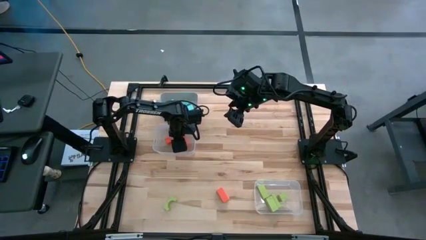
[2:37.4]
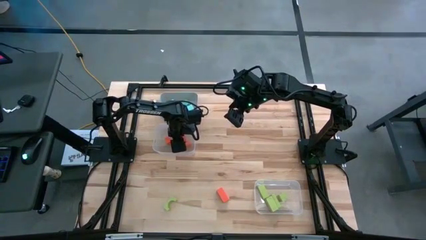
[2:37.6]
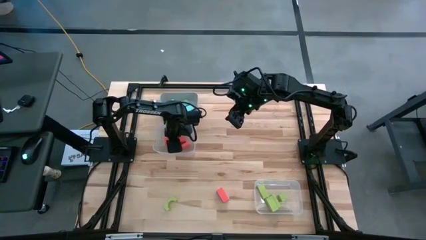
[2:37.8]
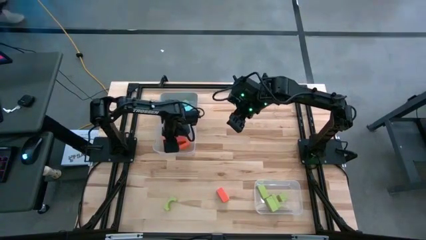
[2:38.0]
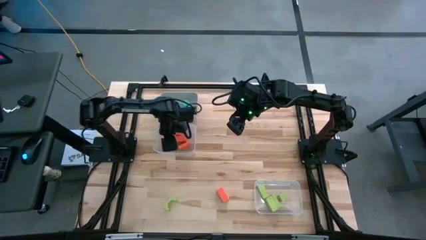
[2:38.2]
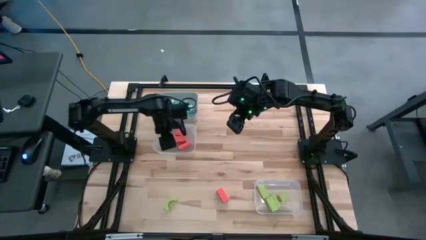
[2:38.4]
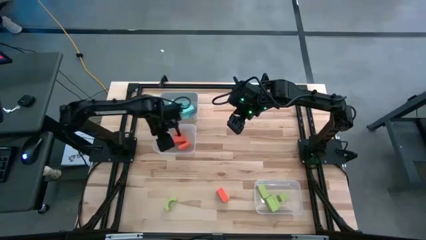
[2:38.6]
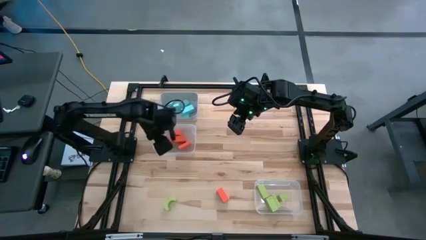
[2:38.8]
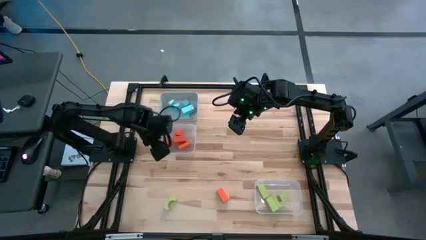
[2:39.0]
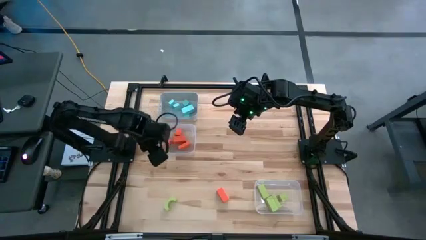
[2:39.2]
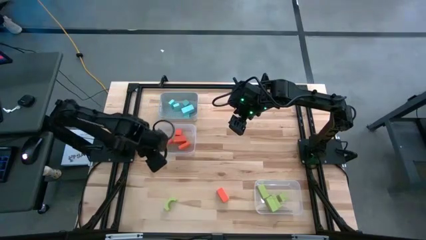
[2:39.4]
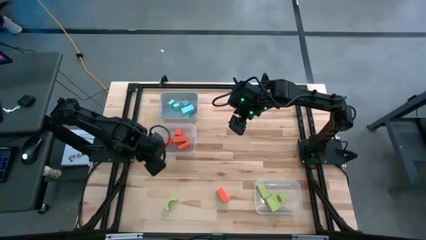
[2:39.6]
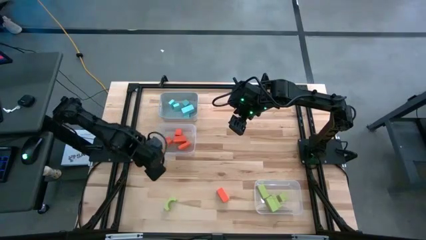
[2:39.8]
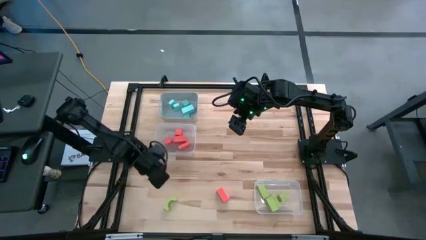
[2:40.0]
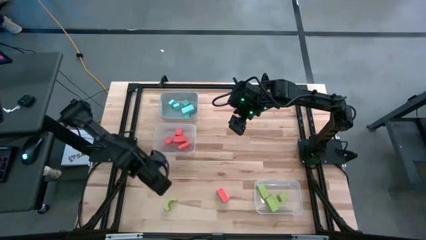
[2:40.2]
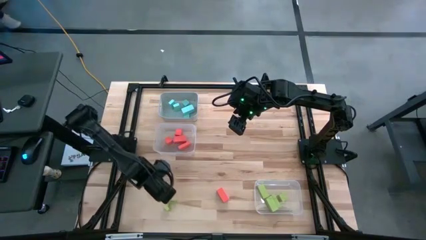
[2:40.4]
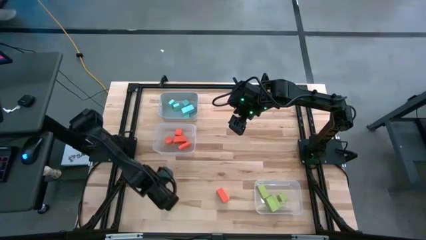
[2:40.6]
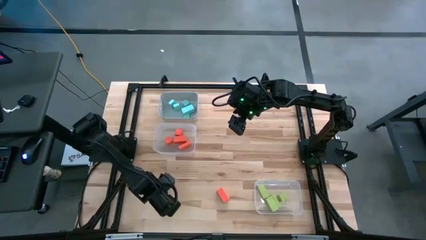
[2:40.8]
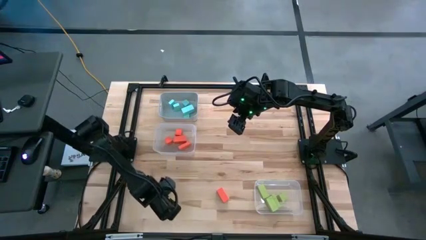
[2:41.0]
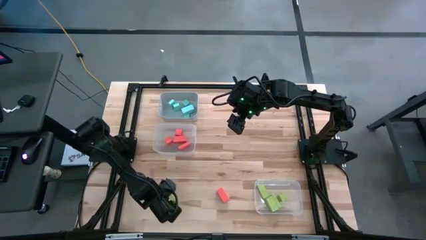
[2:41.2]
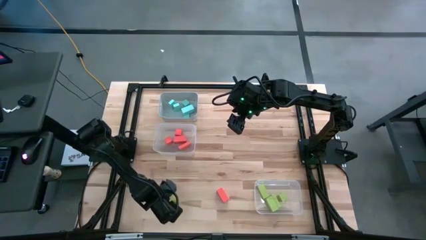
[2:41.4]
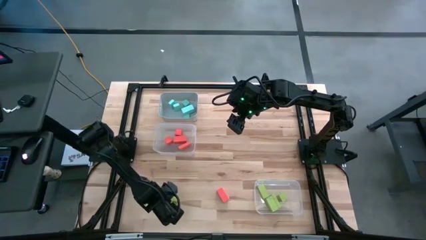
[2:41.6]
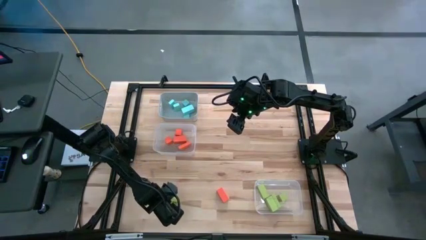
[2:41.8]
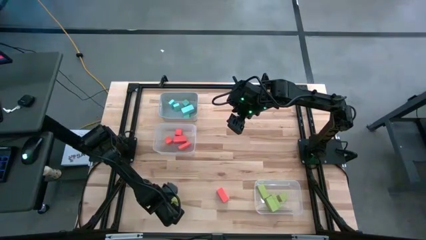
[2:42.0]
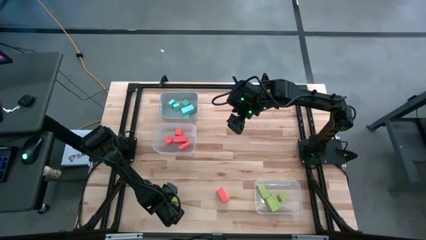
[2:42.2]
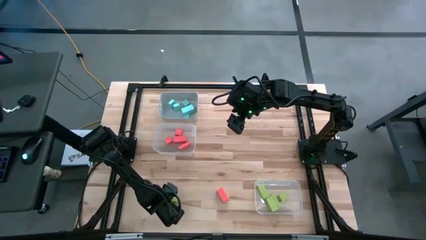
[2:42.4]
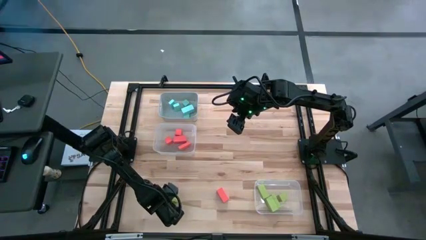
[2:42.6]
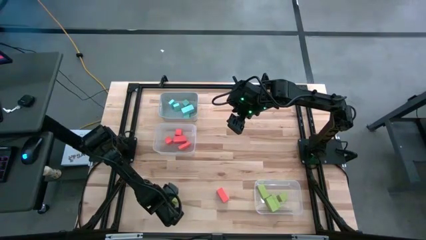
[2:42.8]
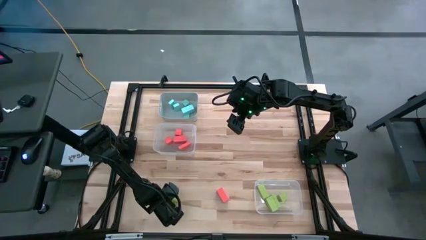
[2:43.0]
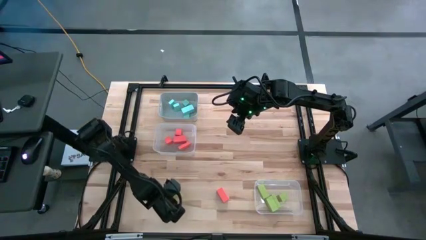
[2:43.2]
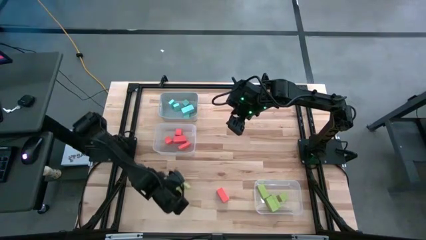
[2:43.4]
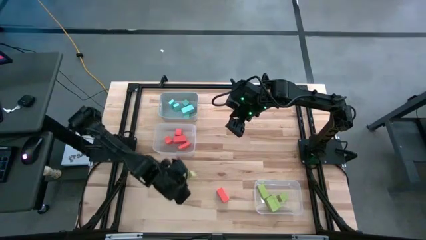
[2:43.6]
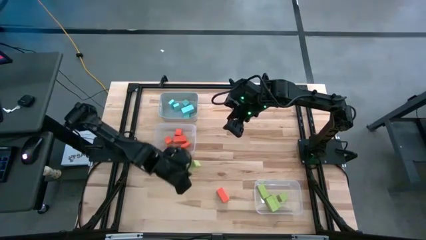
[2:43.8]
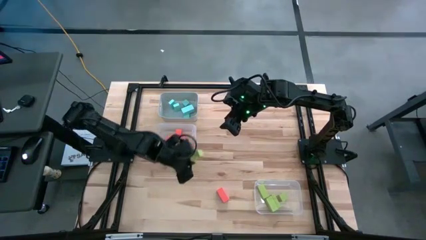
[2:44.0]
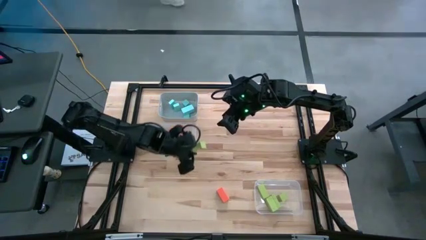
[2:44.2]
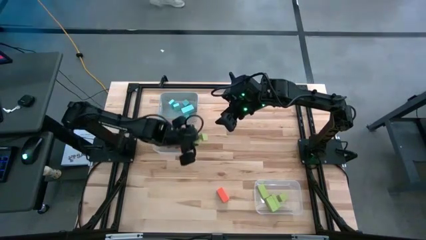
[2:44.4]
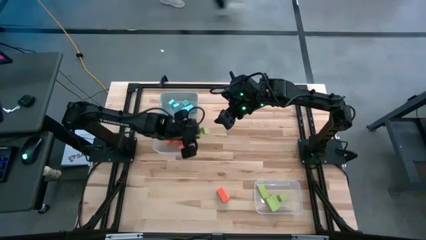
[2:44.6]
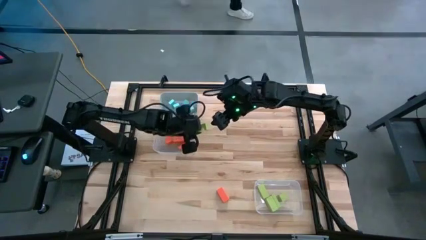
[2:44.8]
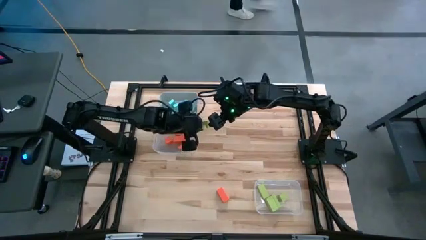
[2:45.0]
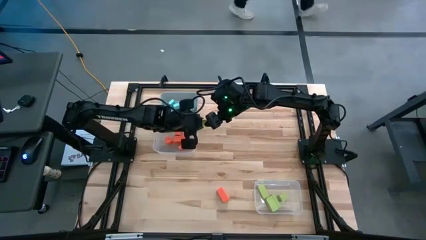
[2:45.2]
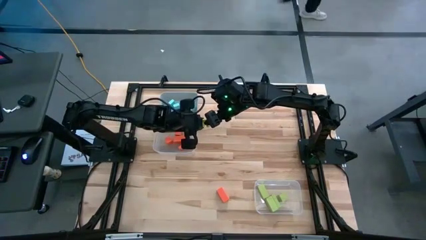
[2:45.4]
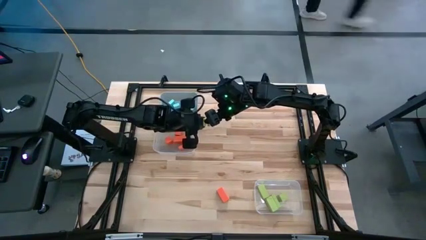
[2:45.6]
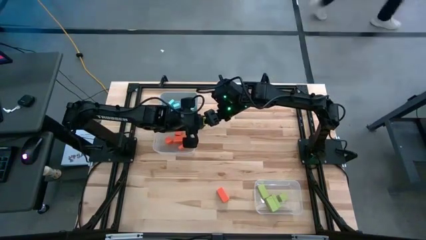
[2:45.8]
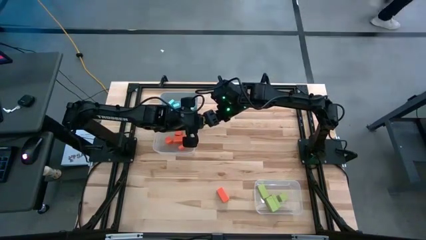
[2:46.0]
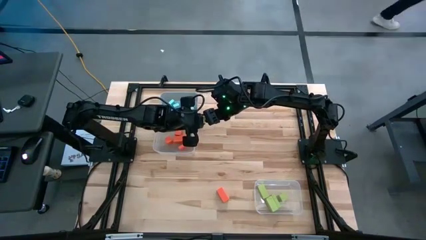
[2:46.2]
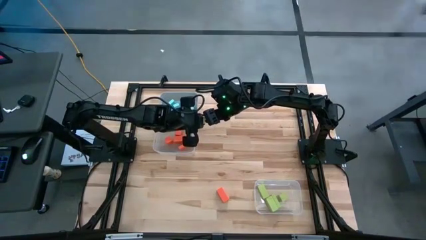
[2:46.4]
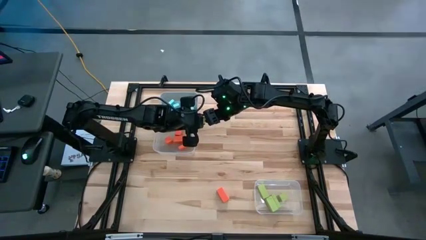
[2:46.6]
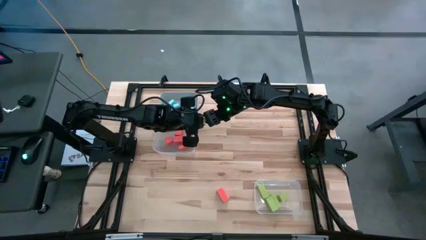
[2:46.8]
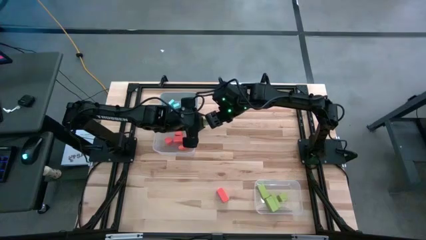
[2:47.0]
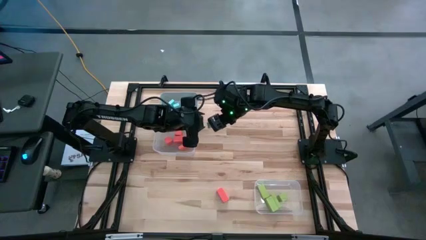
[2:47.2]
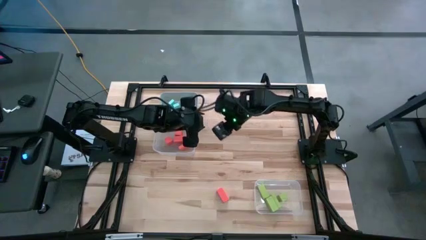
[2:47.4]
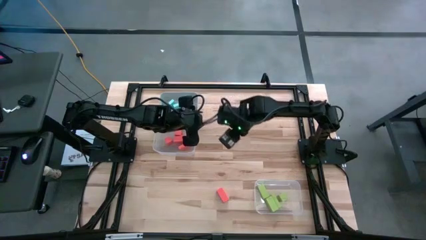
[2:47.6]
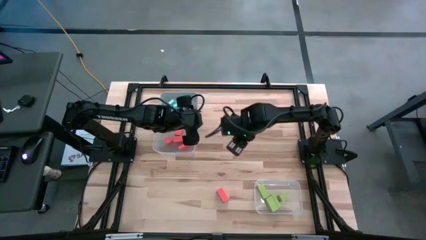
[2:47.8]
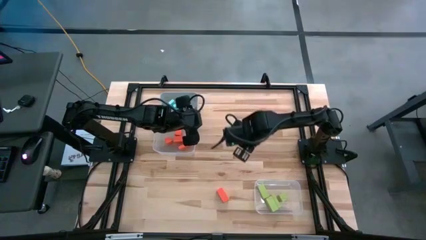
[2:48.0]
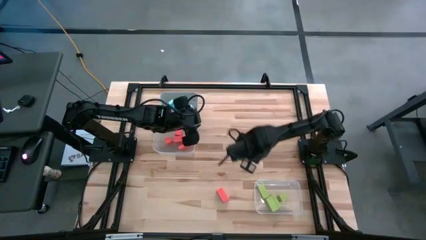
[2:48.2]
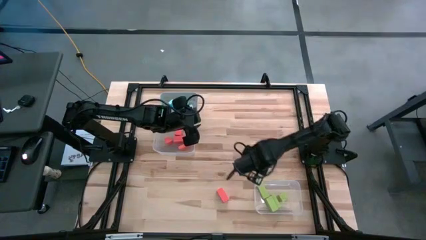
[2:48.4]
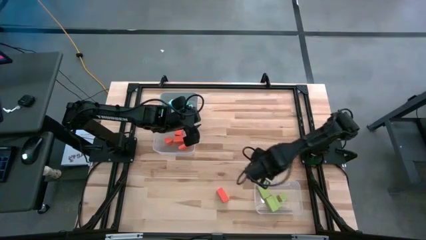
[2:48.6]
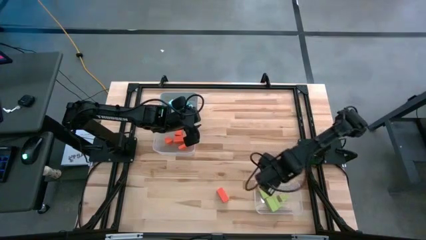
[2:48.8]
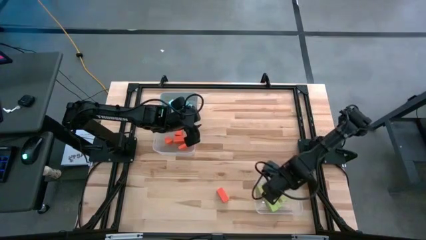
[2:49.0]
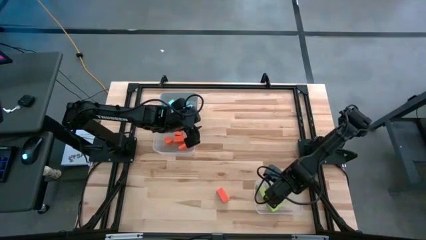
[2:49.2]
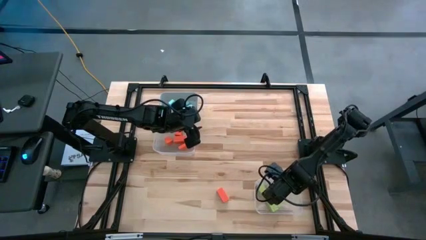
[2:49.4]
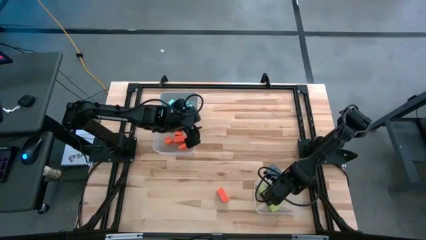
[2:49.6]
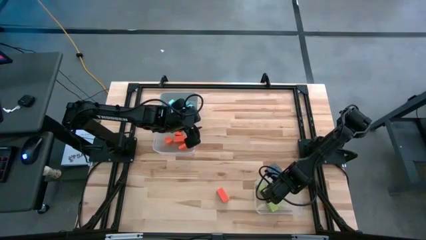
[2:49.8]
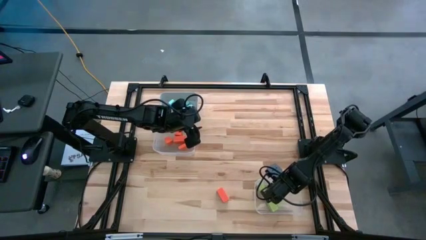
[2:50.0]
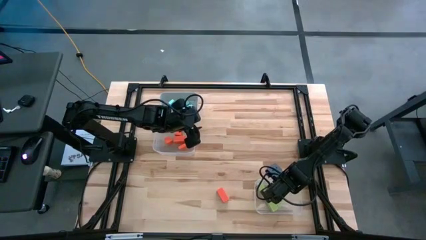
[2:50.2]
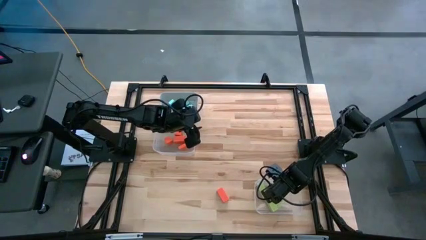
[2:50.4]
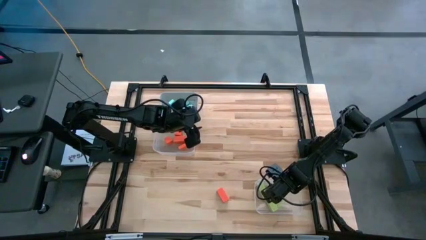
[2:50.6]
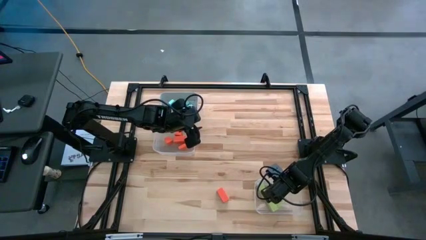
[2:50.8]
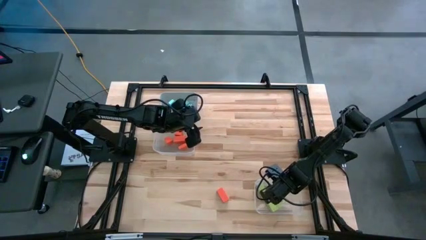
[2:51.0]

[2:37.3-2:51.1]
Task: Sort & place blocks by color
Put the green block into the bottom transparent bin

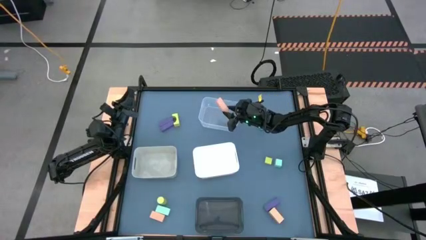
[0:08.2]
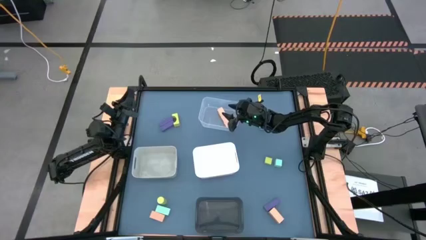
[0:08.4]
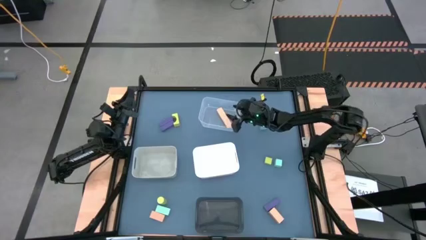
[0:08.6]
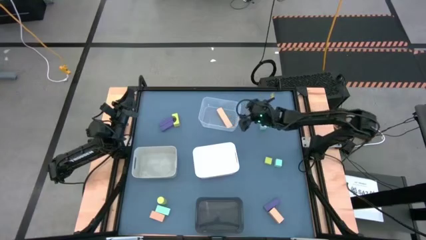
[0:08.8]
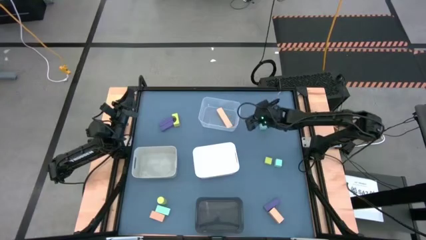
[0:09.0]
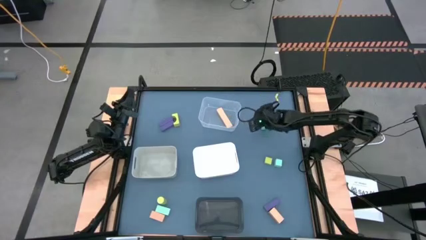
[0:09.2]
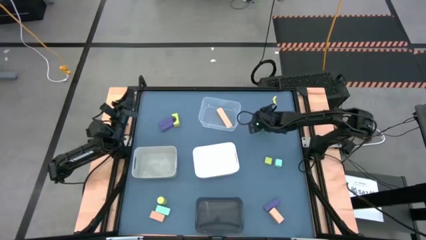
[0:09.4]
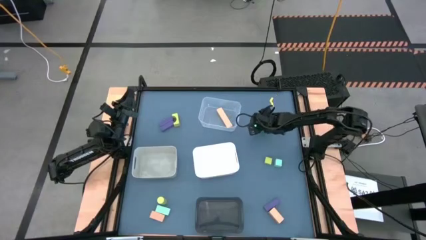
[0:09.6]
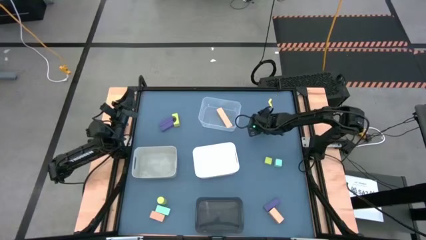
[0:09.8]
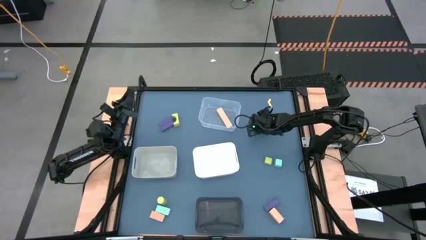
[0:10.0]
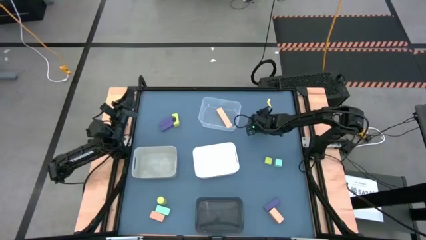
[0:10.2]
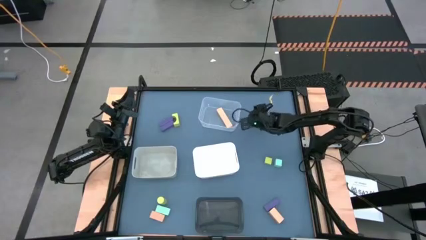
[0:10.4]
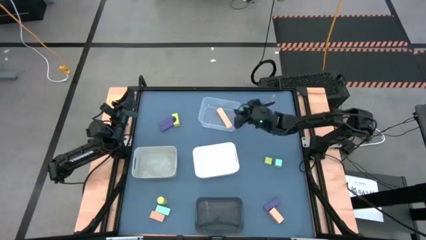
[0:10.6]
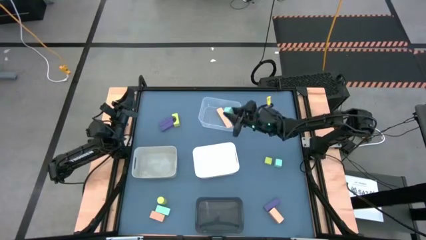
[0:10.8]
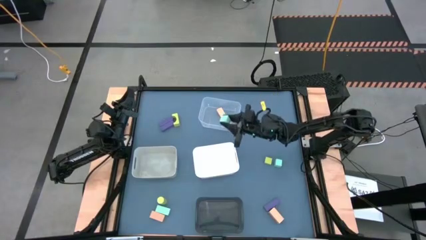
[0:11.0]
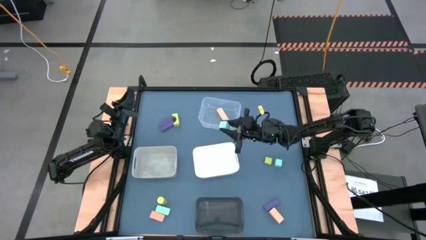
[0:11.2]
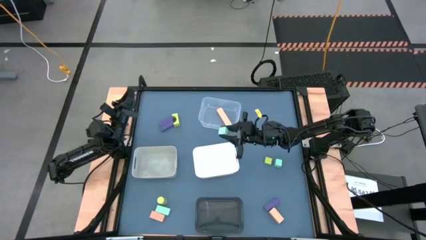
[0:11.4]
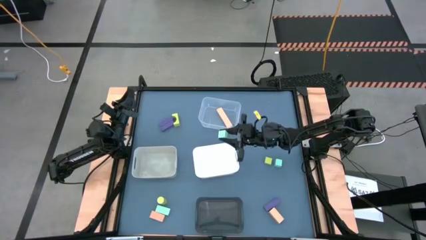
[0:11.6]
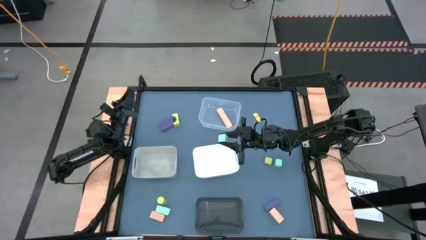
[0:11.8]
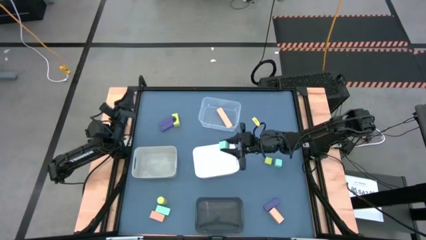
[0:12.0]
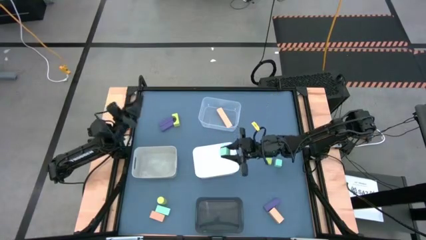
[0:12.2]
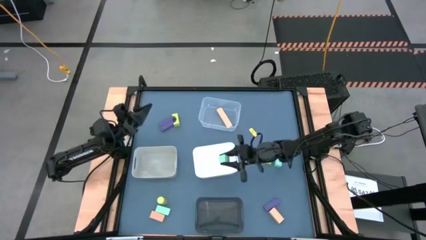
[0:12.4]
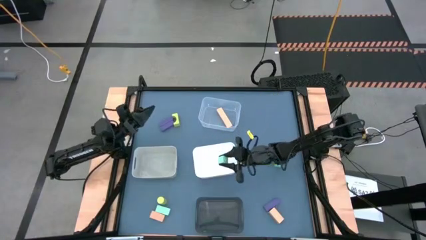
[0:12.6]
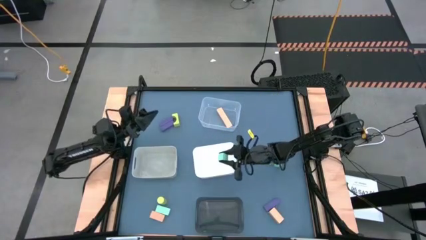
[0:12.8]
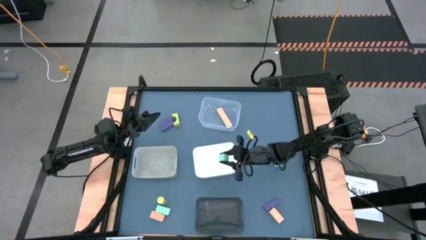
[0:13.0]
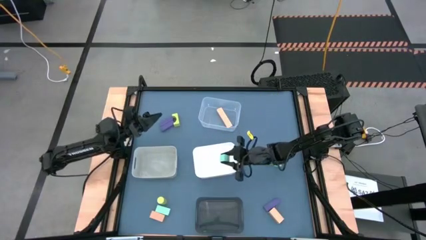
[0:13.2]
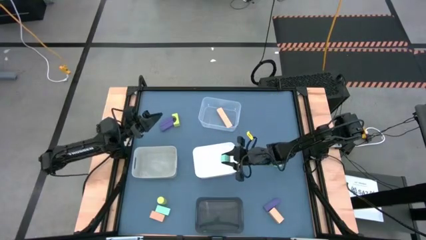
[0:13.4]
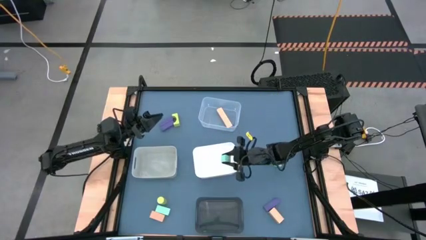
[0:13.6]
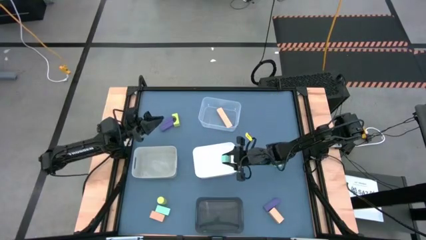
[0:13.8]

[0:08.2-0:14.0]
Task: Sort & place blocks by color
Put the top blue block into the white bin
